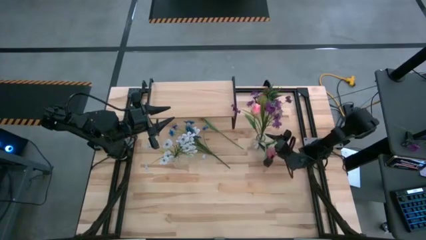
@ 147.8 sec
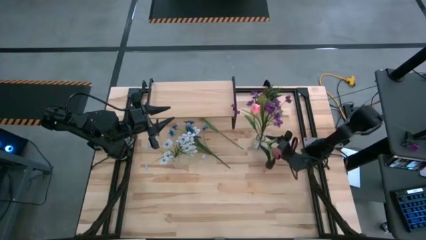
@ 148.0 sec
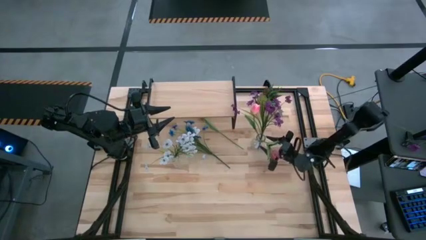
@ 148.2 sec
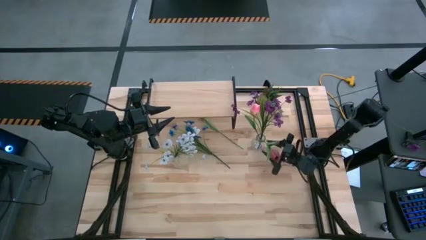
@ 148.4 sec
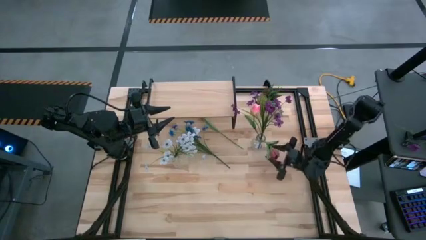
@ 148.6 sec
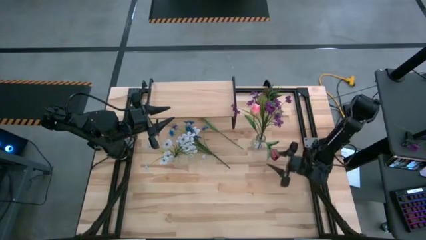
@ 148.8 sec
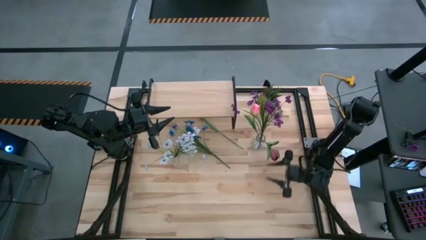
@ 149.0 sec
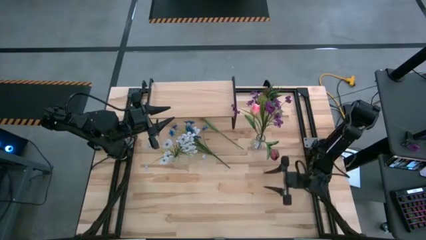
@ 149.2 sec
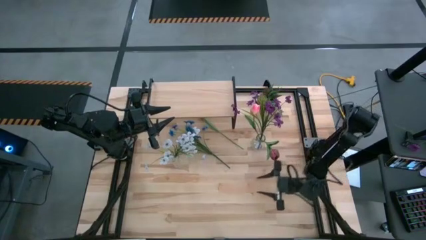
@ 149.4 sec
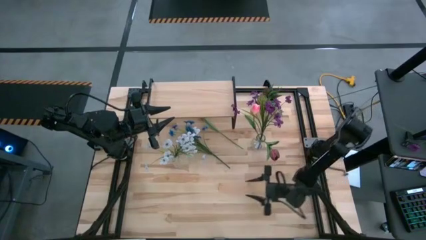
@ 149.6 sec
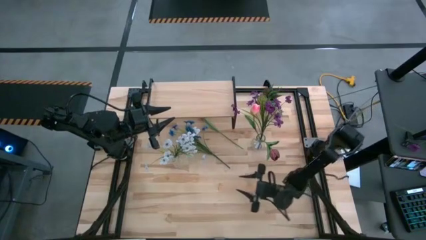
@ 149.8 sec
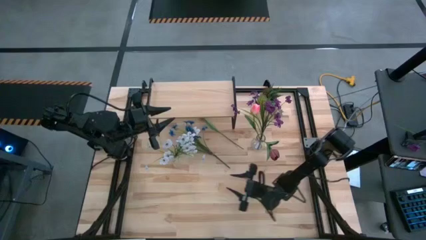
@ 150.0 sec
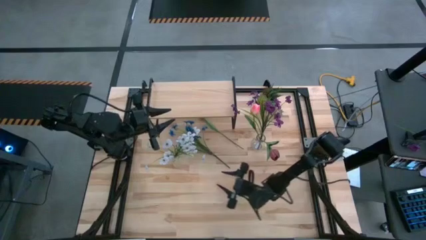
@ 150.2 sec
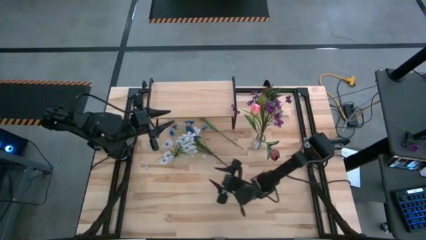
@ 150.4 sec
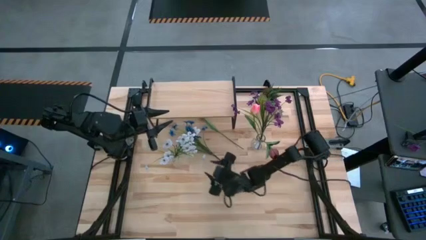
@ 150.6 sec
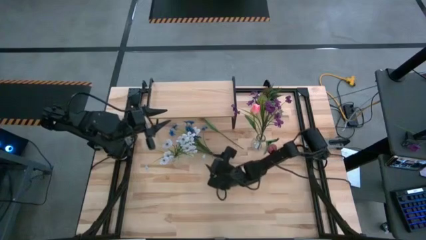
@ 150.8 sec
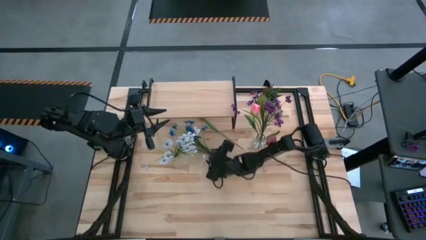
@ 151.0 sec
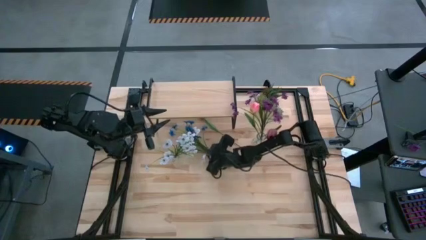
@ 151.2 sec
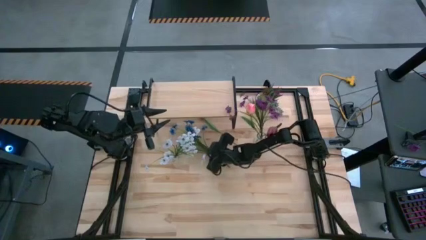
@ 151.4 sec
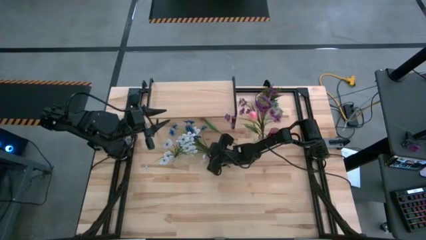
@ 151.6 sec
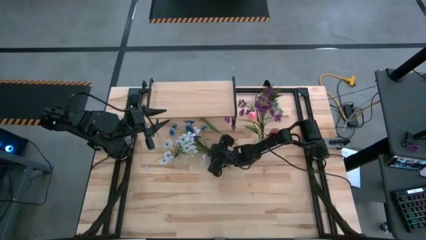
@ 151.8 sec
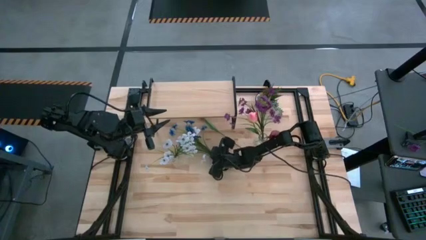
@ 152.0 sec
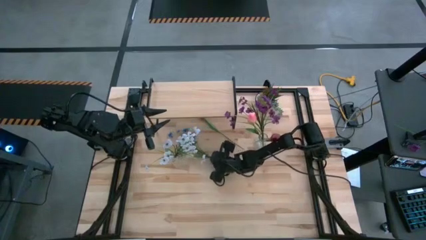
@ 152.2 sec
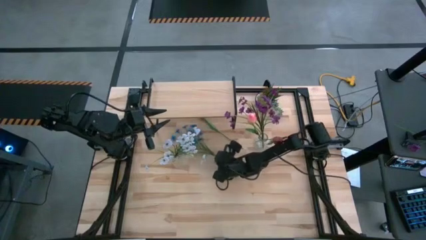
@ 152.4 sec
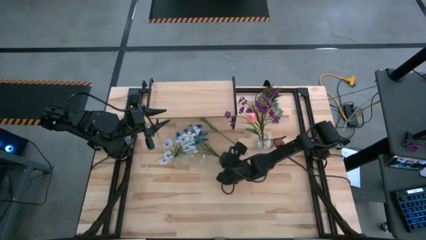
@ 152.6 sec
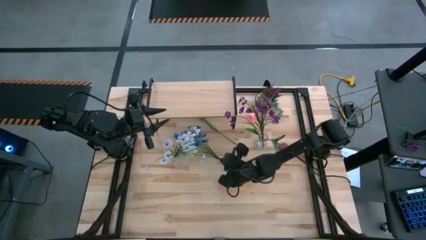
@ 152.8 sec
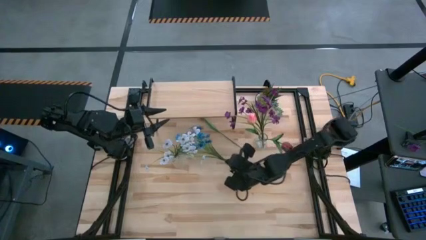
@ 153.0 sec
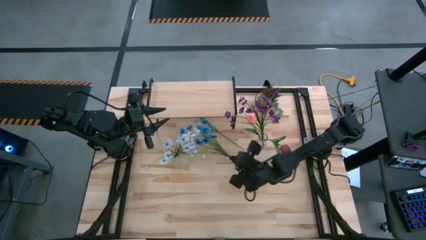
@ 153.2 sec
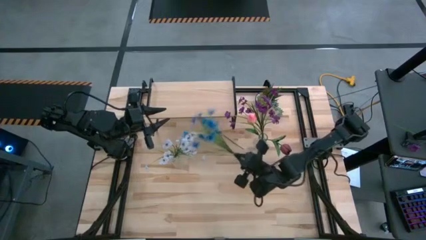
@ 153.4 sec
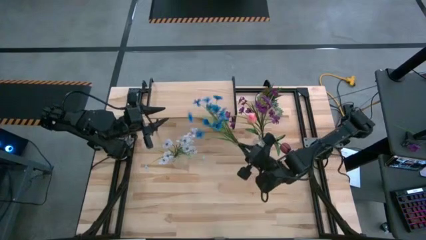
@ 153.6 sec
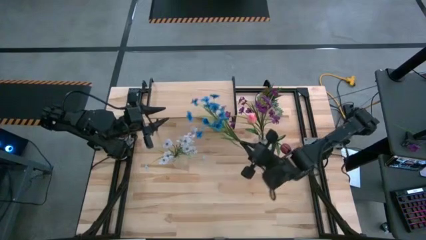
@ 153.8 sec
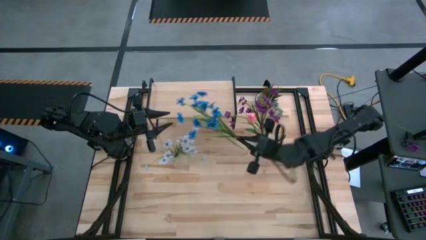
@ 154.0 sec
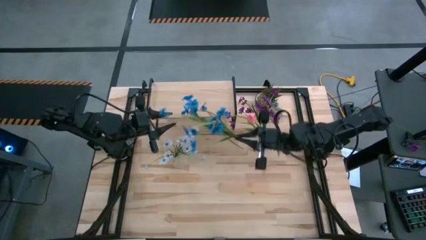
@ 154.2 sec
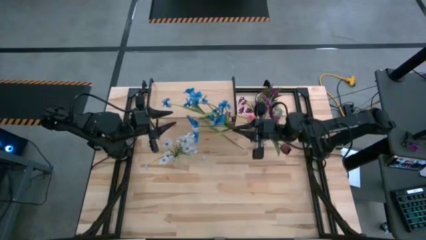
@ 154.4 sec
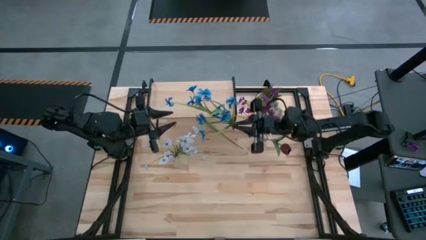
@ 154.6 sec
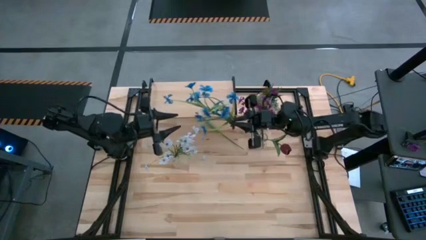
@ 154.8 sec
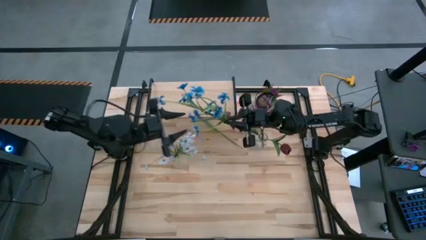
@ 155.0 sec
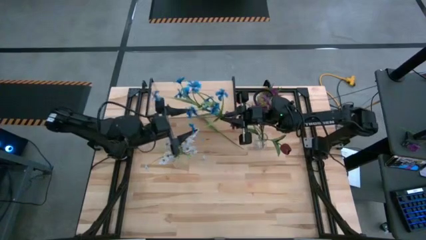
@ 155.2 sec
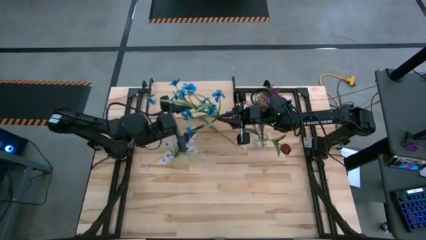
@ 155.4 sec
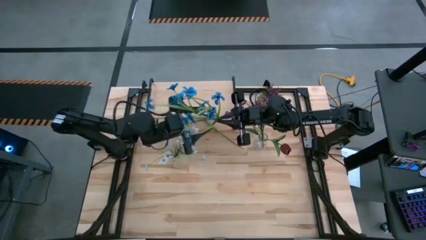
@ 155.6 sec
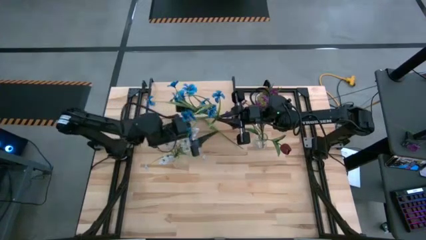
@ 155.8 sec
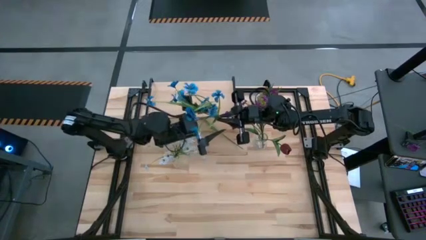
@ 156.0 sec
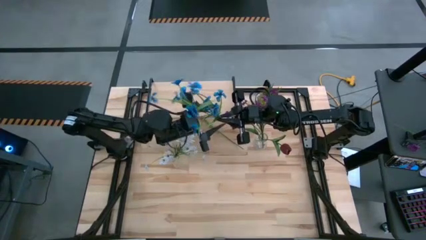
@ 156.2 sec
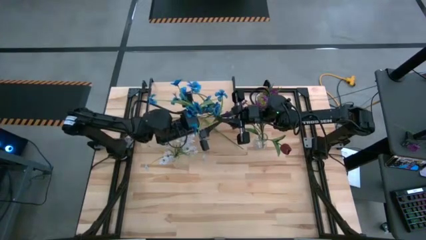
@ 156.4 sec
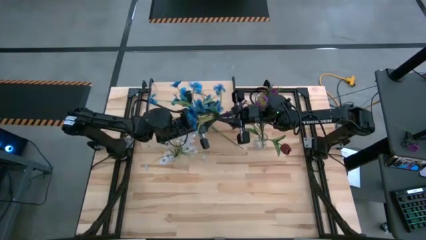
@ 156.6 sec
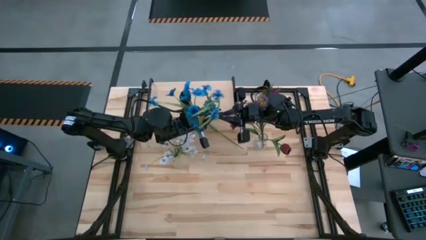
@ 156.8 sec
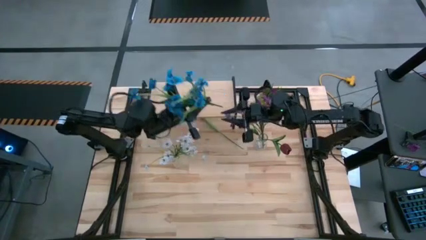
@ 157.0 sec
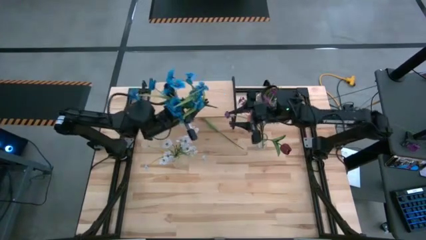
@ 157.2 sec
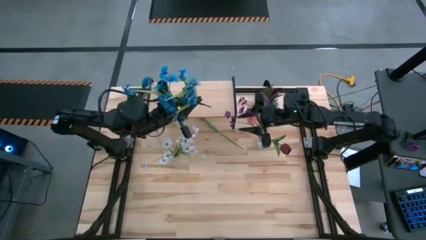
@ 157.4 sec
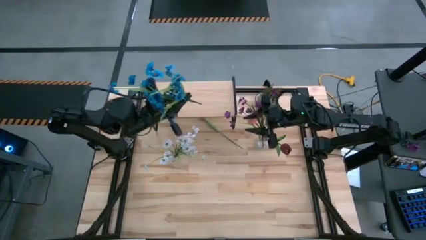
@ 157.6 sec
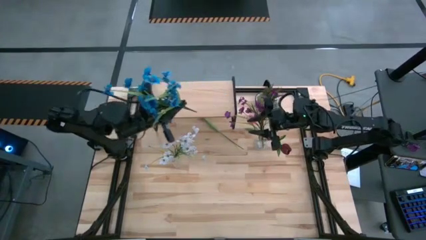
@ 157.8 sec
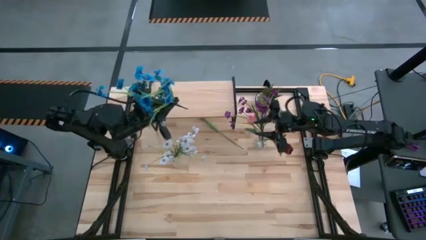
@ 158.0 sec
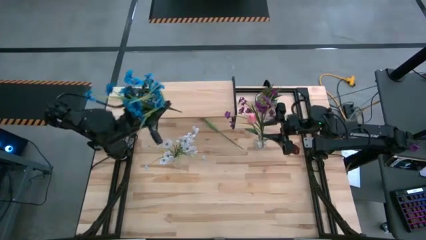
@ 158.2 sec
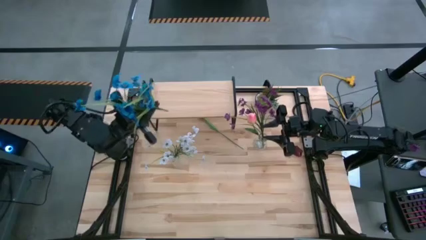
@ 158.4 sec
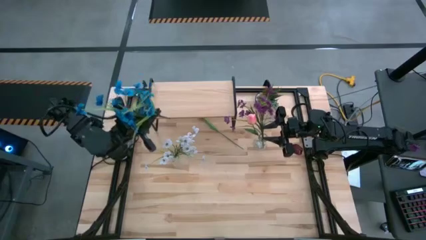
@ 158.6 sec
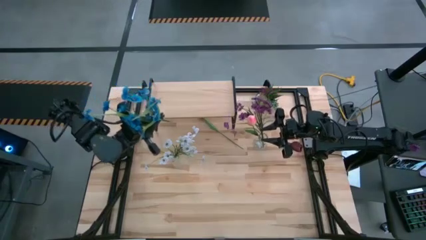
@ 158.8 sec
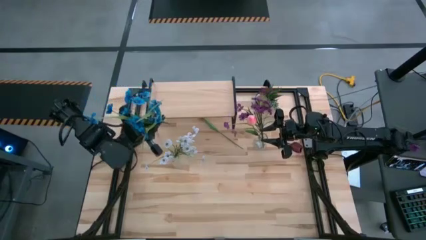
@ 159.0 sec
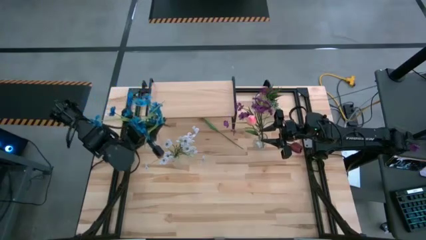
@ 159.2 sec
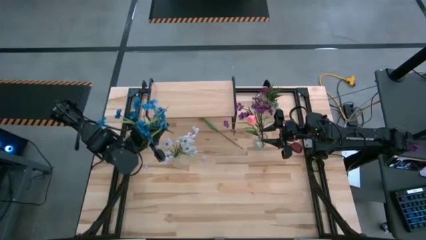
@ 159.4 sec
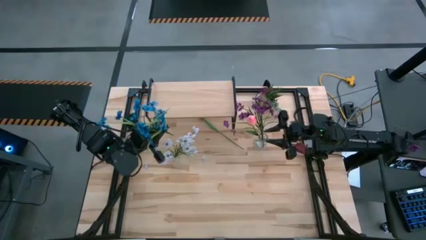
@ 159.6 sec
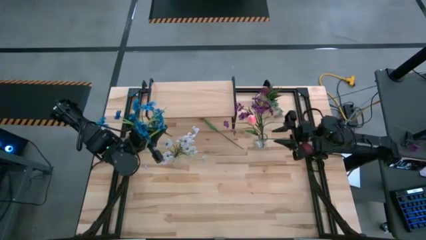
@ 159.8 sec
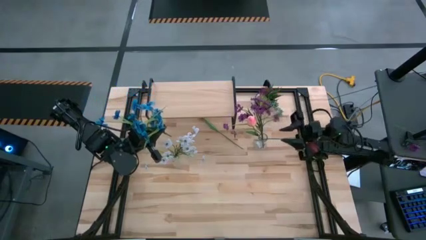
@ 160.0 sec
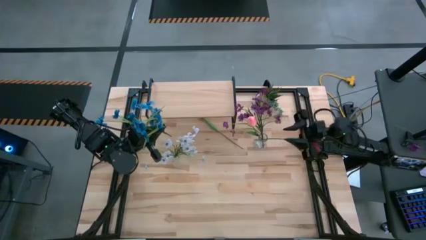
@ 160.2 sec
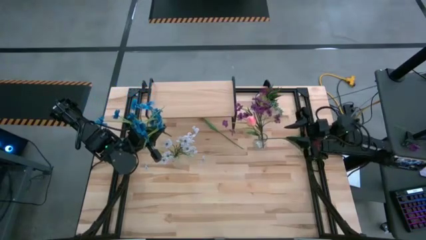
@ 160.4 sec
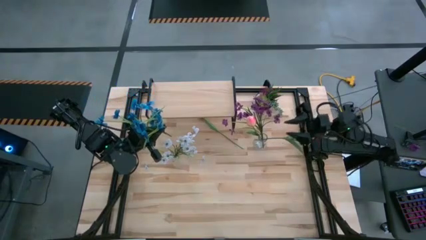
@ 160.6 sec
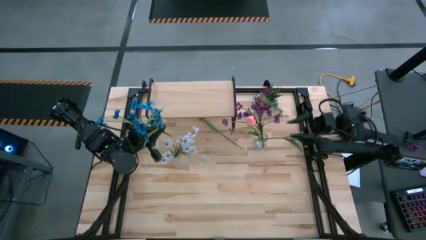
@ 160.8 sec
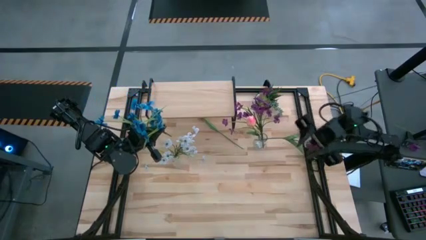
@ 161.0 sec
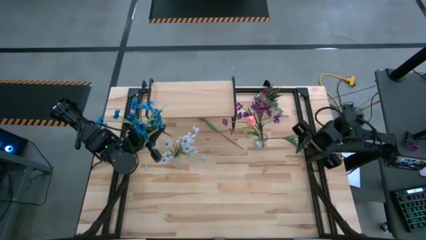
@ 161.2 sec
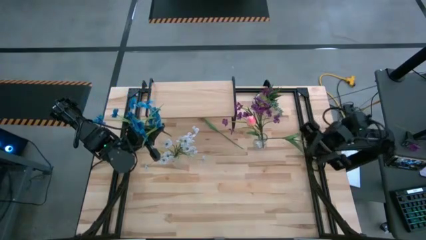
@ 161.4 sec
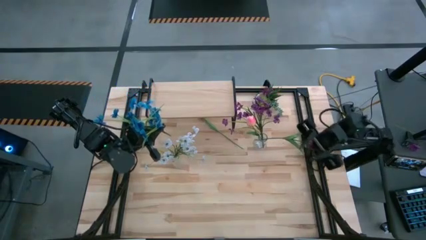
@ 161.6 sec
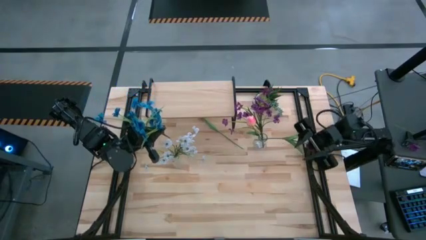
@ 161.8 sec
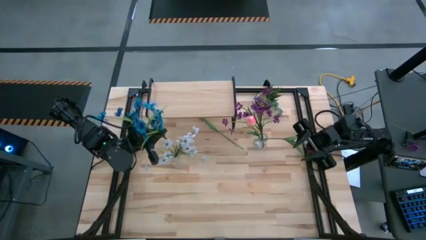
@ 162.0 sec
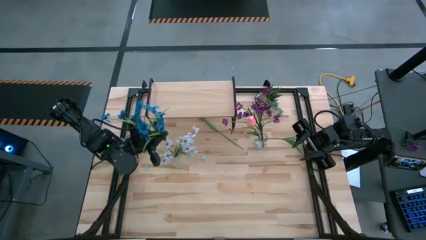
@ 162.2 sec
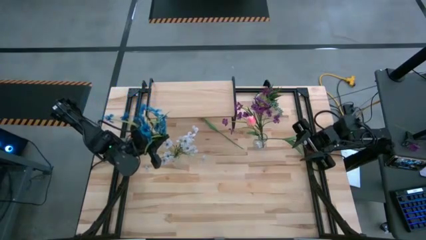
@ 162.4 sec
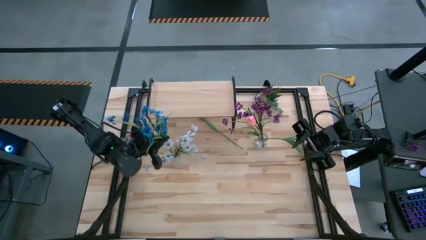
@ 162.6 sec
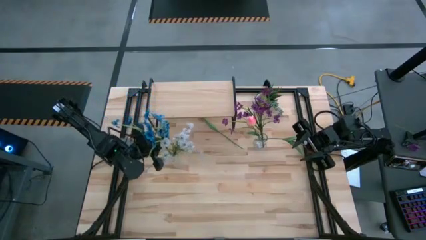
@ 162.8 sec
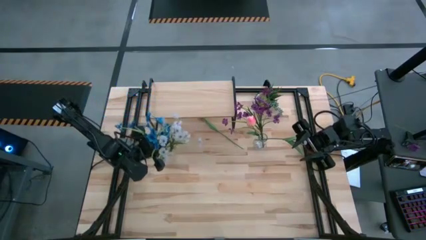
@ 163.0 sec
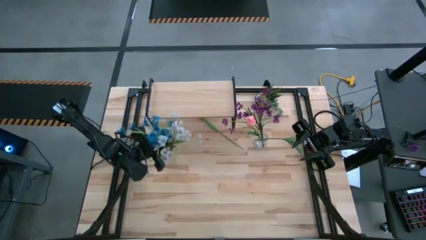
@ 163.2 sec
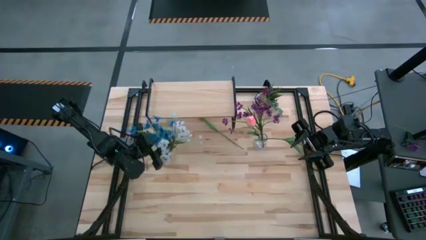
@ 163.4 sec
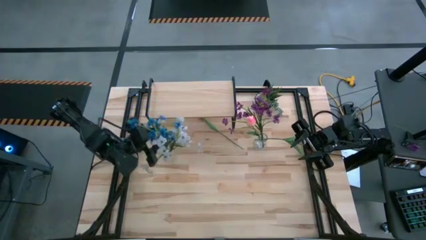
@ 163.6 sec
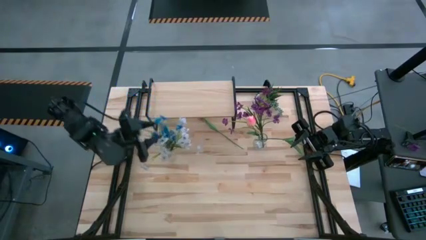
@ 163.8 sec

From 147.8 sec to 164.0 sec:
Task: Pick and place flowers into a vace then onto a shelf
Put the blue flowers into the left transparent vase
